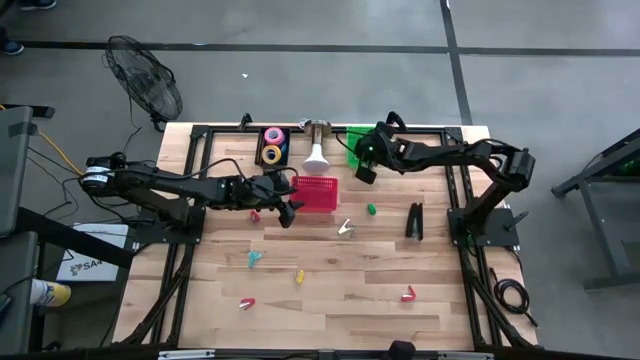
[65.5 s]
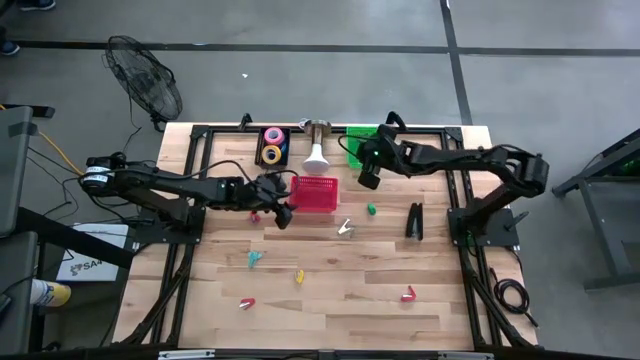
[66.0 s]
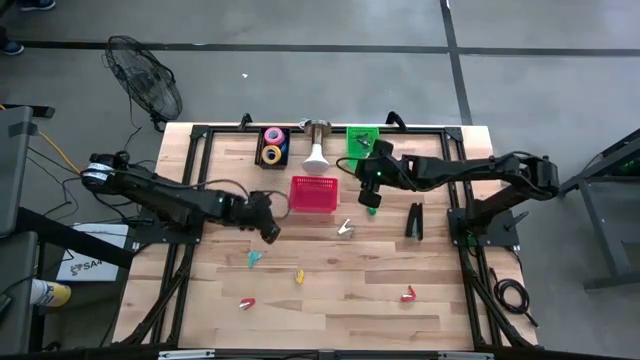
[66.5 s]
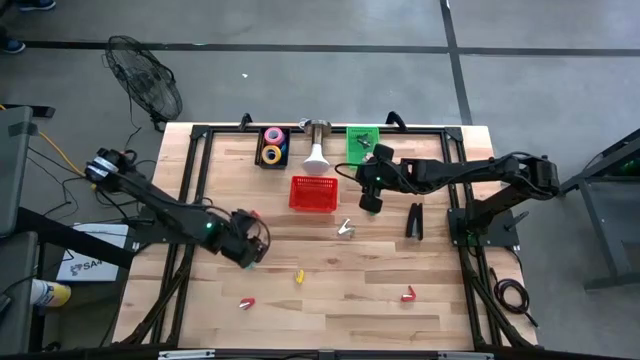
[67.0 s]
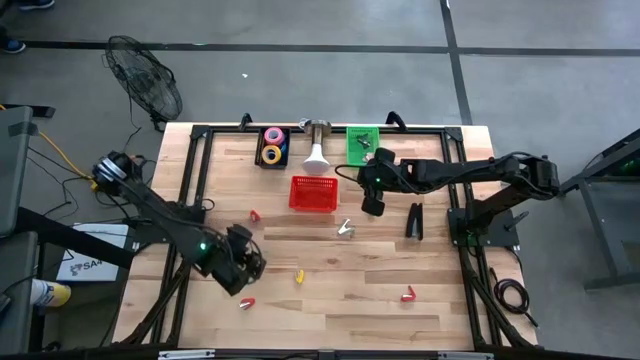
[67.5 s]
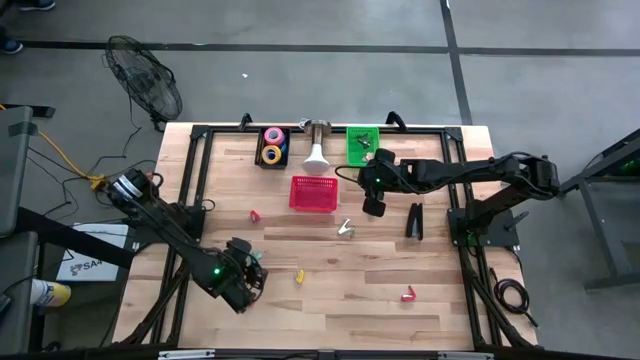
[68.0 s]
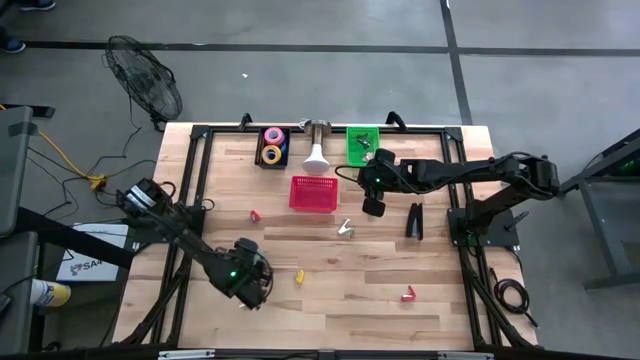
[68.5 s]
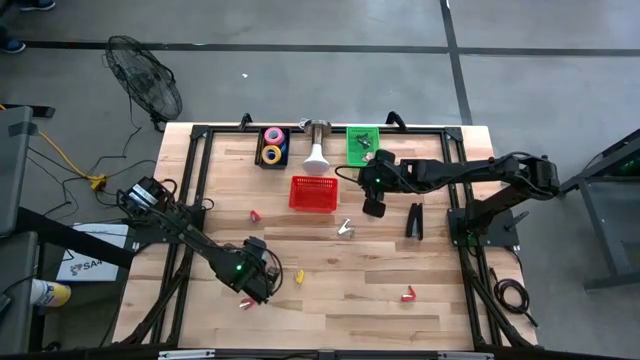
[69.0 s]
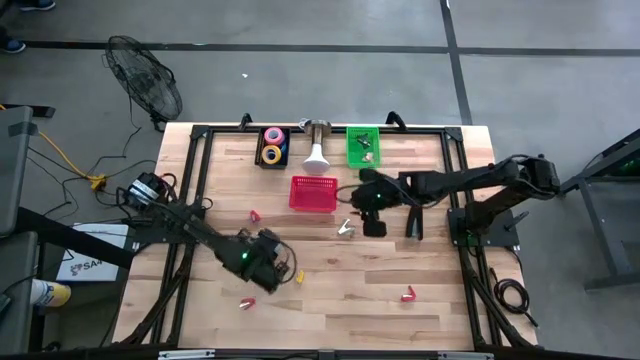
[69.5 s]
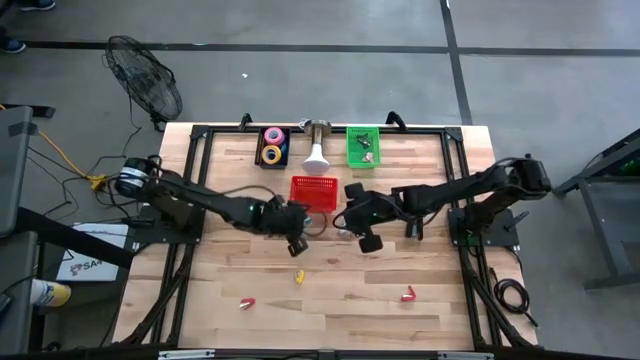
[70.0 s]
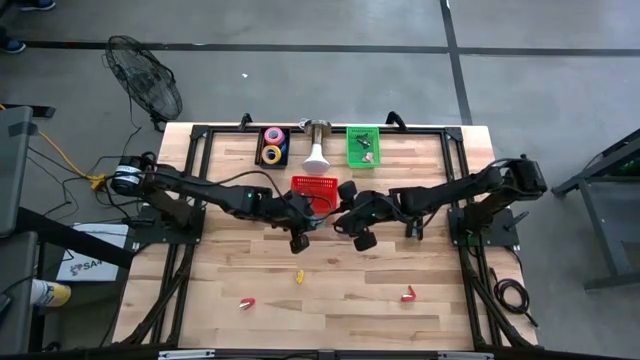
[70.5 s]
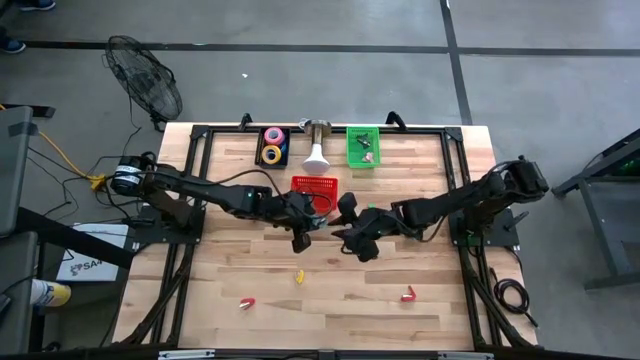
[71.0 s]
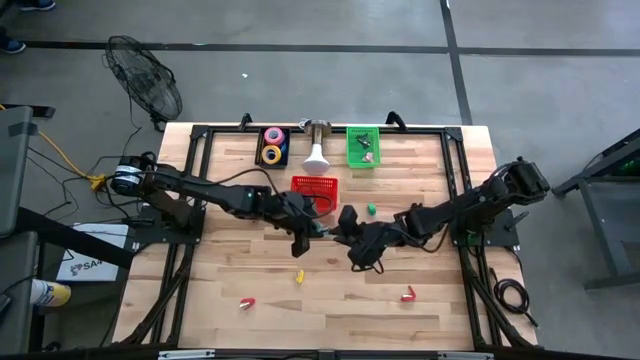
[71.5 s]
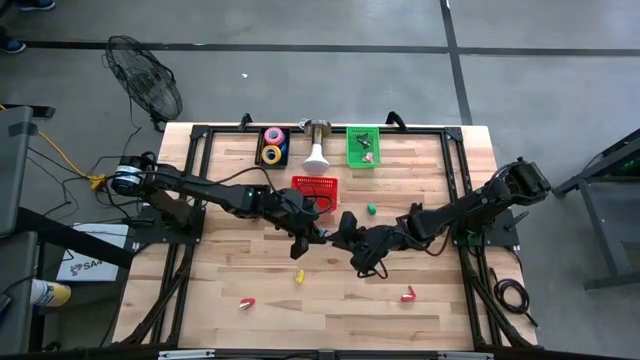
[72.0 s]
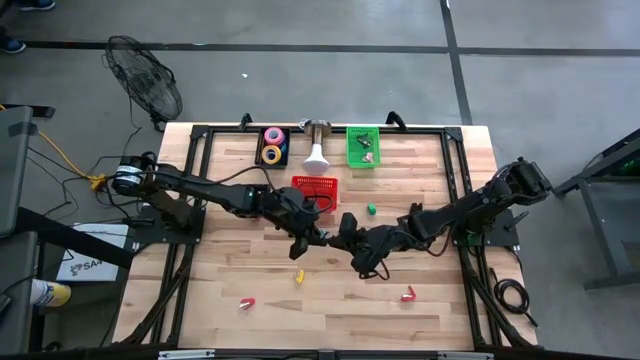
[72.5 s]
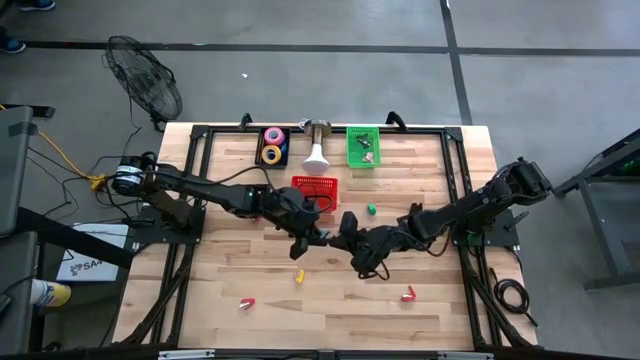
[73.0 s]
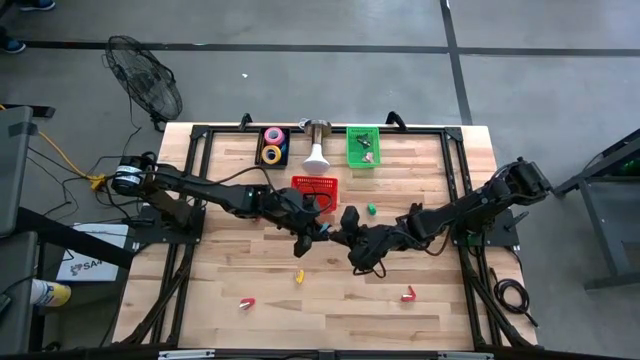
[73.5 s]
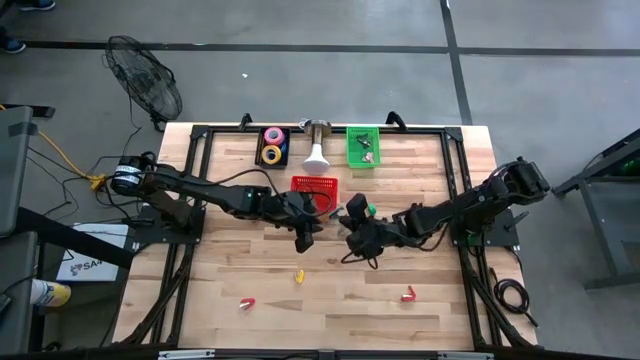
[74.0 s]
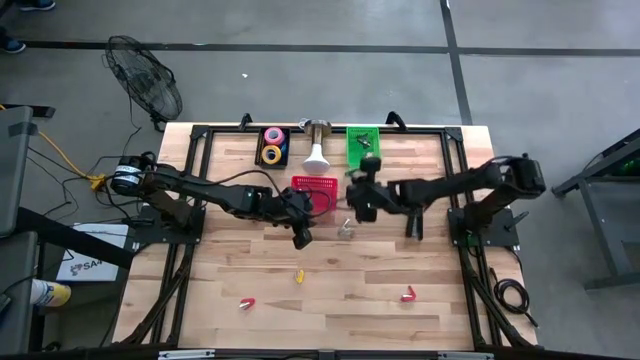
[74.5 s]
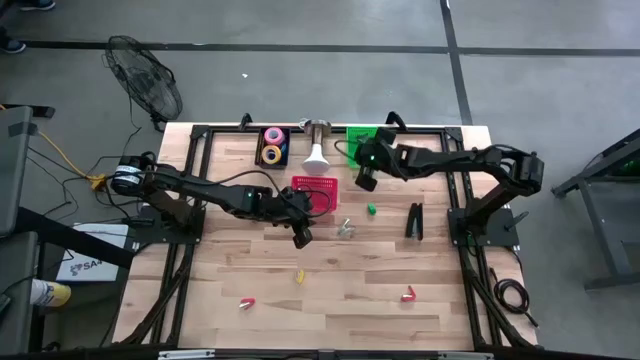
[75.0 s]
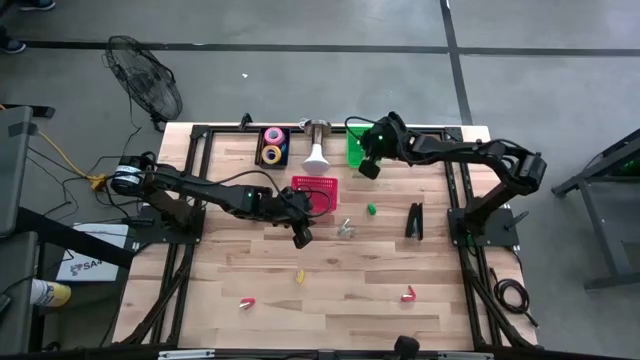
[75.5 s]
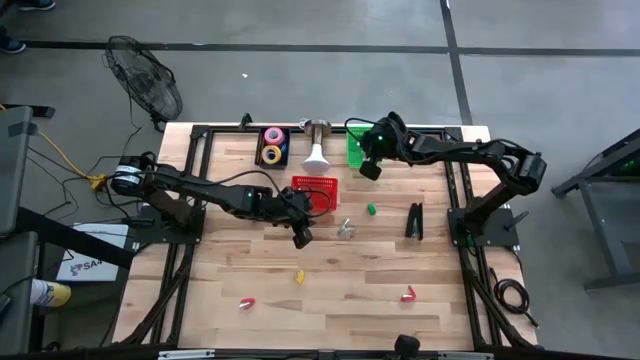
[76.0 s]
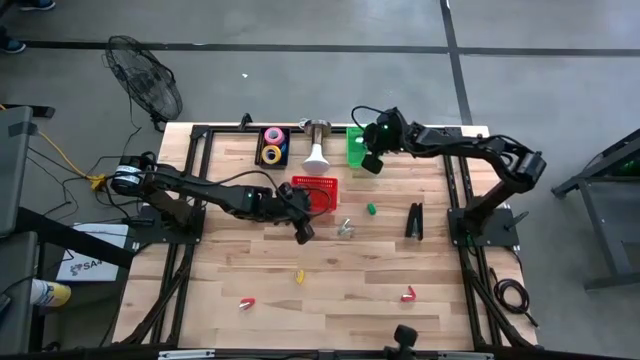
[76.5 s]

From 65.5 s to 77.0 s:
Task: Pick and place Stapler, Stapler remover, tape
Put the light blue staple remover into the green basket

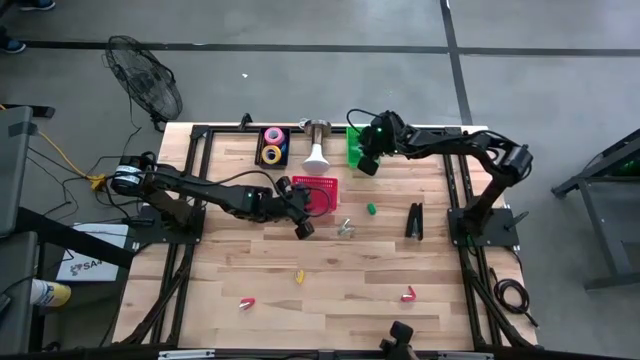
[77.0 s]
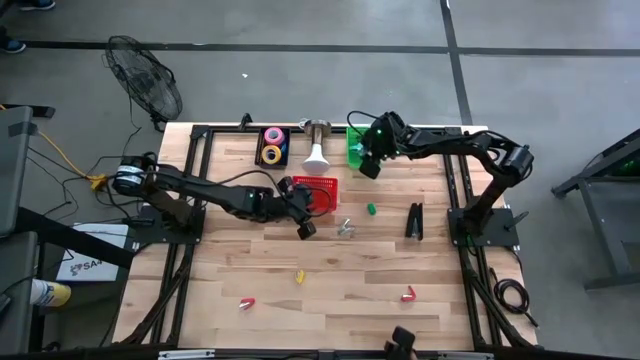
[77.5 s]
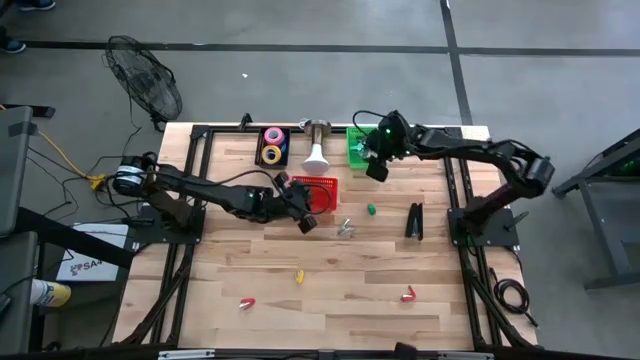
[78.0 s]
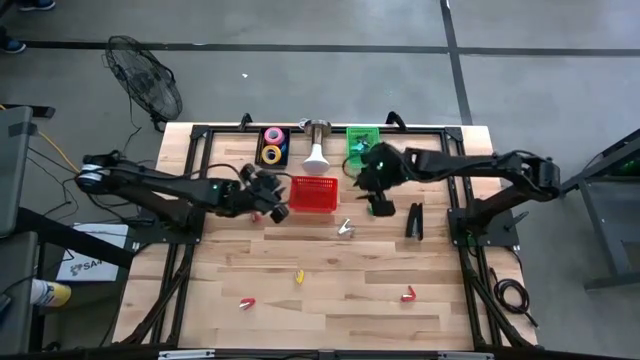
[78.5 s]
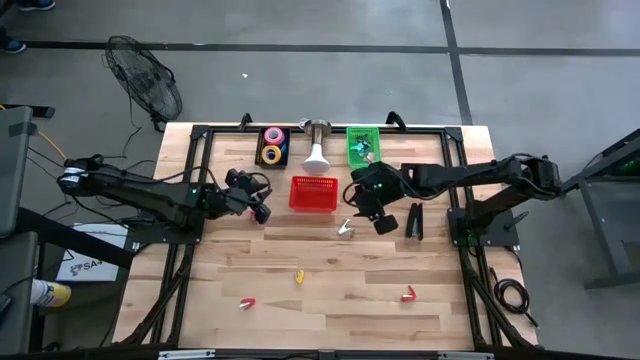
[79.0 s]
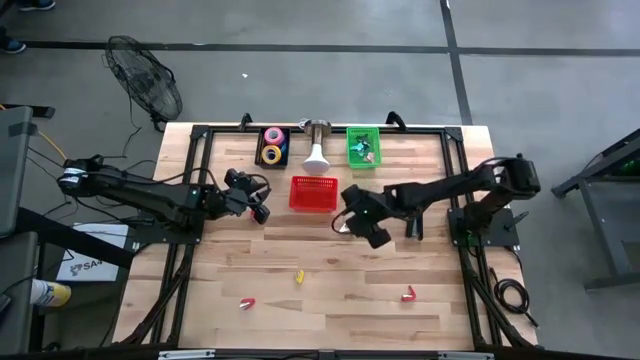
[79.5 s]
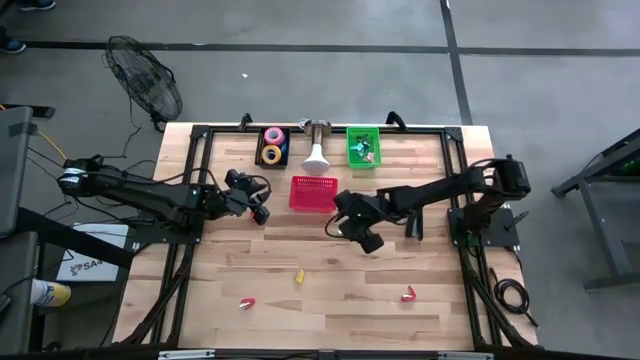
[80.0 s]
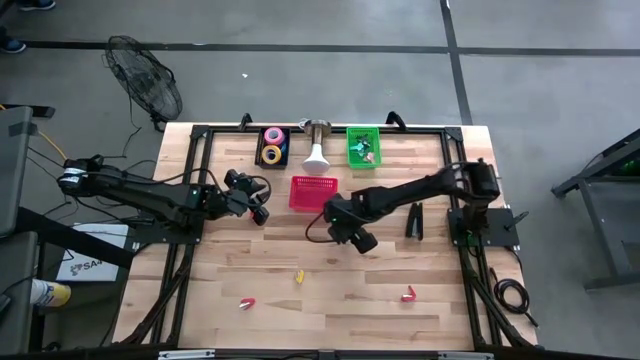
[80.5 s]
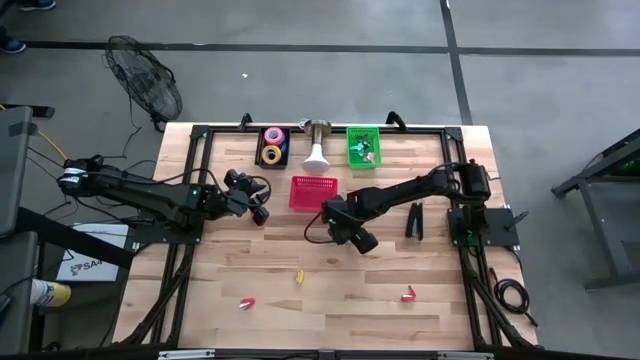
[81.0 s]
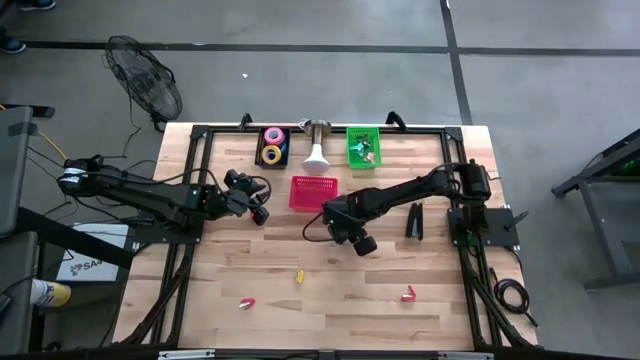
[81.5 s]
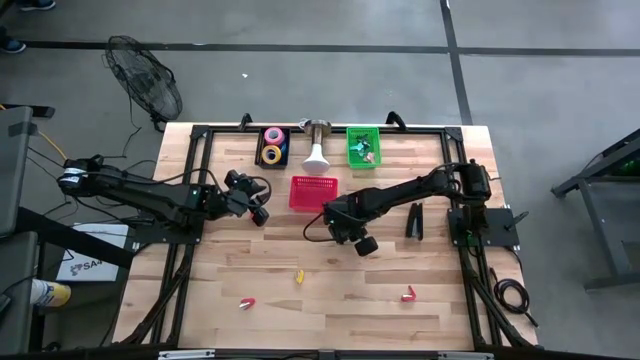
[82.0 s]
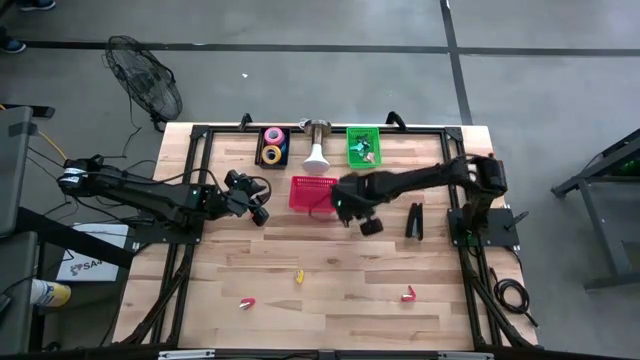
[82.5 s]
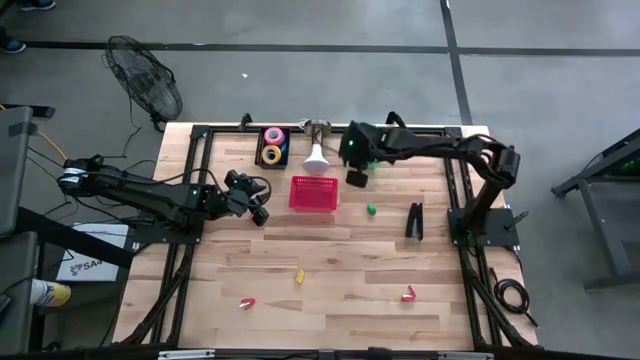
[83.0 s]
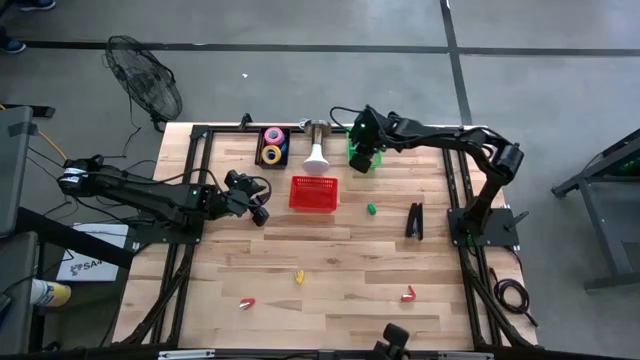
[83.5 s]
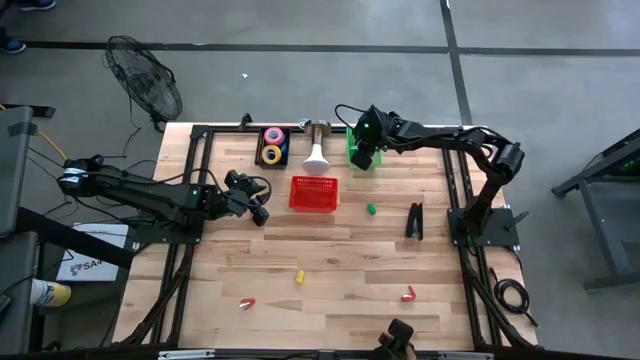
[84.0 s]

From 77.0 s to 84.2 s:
Put the green staple remover into the green basket

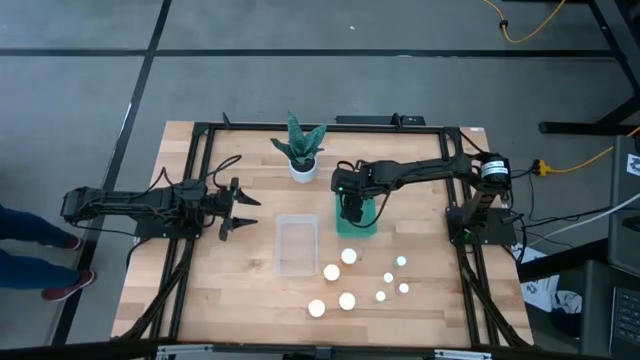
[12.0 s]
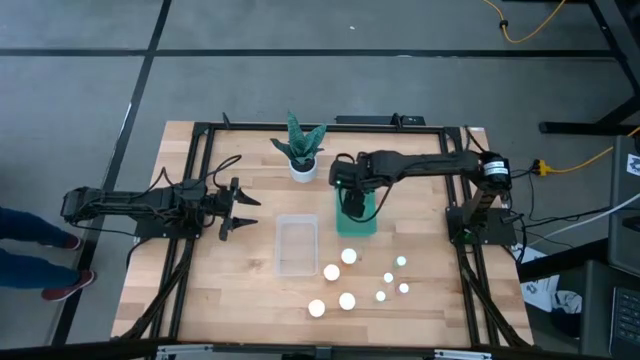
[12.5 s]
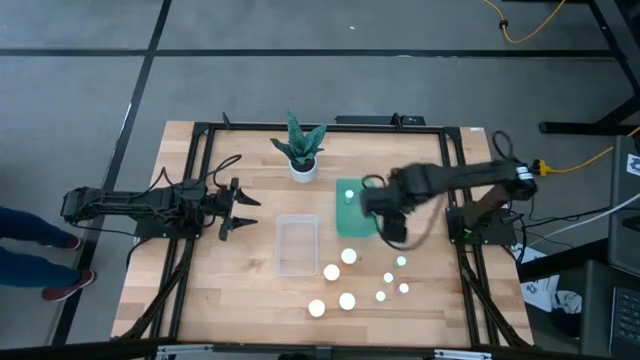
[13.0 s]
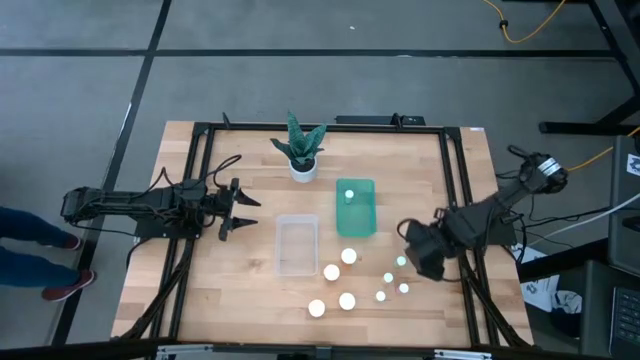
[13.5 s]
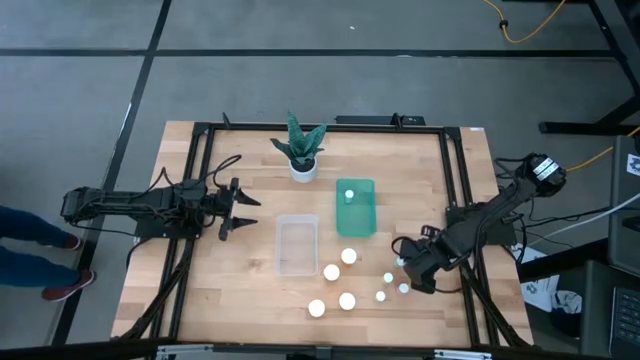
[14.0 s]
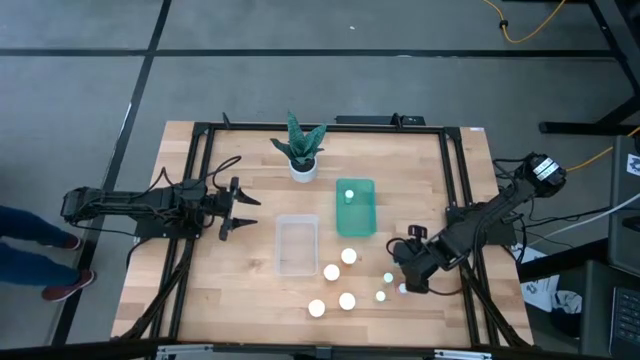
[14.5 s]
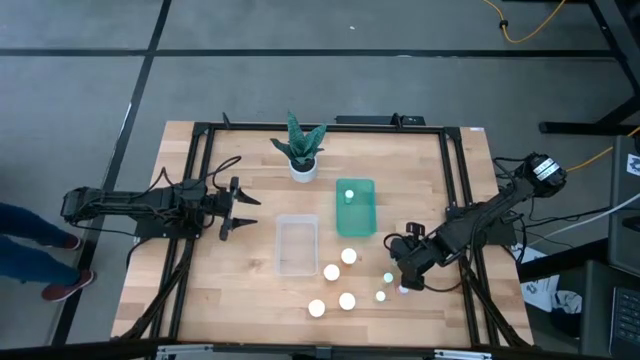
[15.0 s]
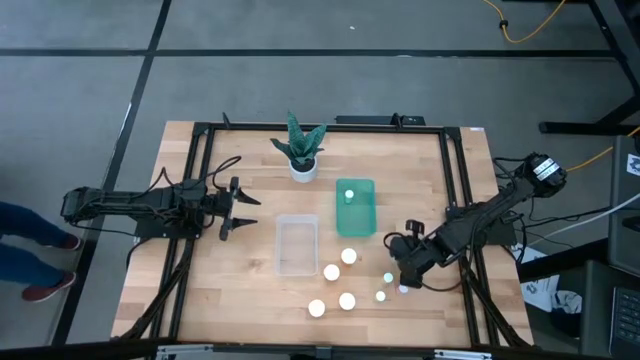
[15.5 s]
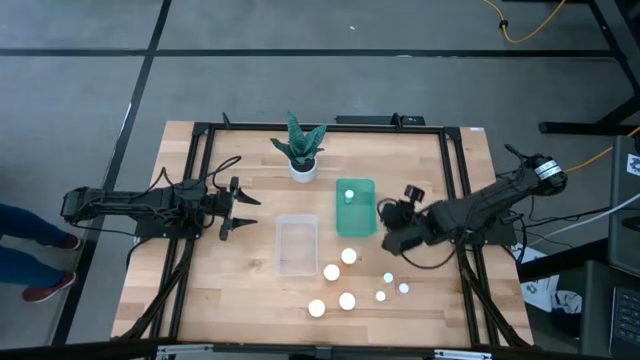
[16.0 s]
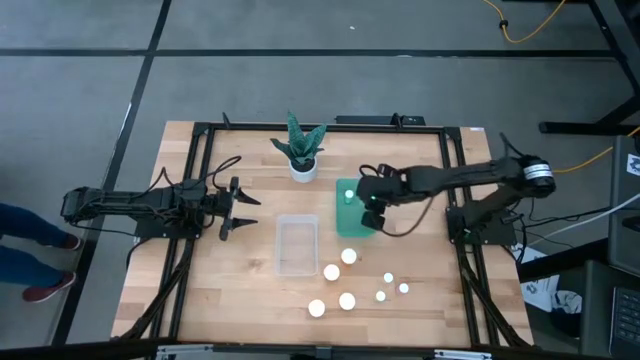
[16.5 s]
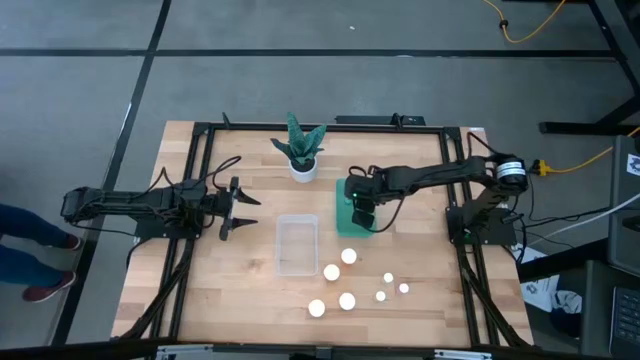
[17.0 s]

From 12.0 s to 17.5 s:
Task: Pick and place medicine bottles into bin by pill shape (circle, oval)
Put the small blue pill bottle into the green bin
